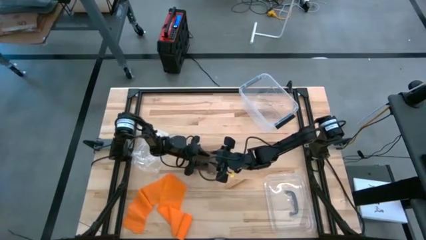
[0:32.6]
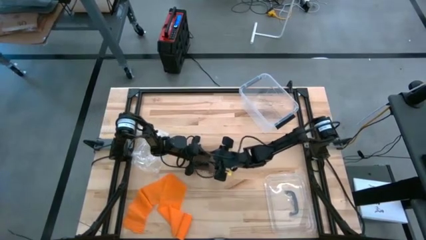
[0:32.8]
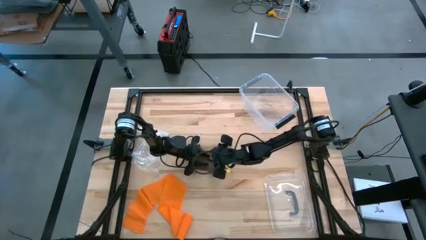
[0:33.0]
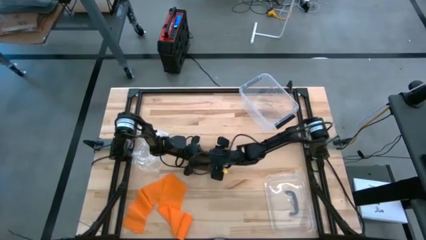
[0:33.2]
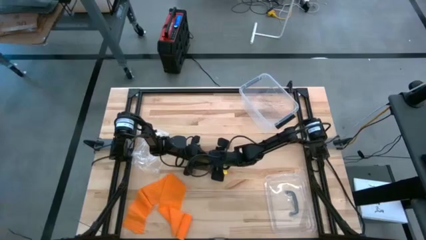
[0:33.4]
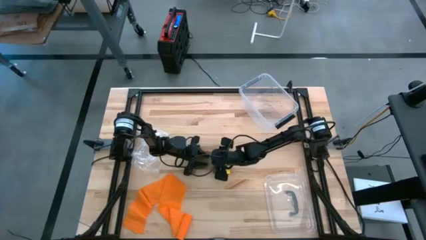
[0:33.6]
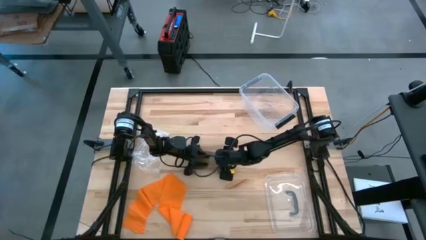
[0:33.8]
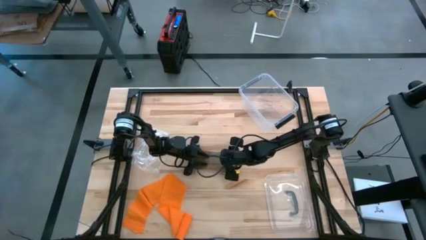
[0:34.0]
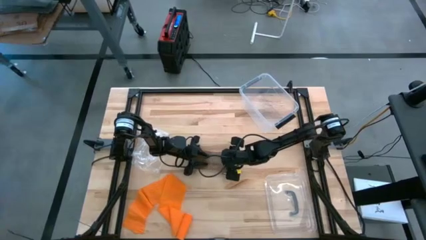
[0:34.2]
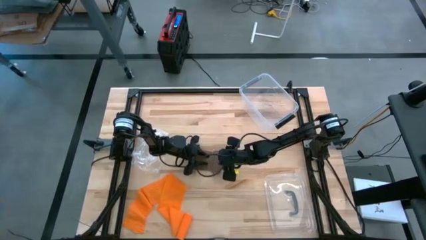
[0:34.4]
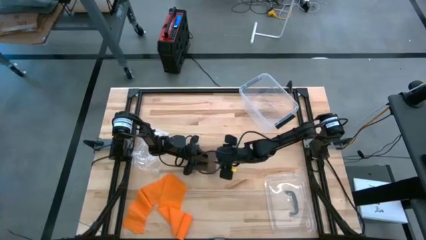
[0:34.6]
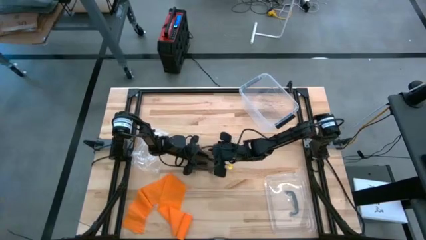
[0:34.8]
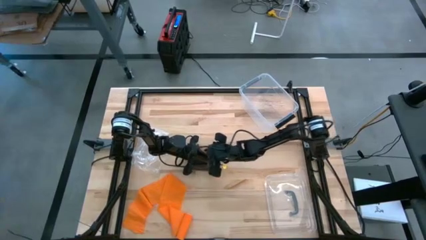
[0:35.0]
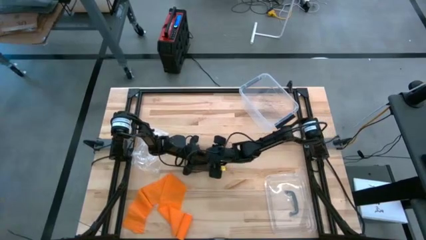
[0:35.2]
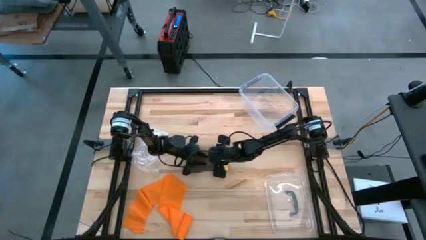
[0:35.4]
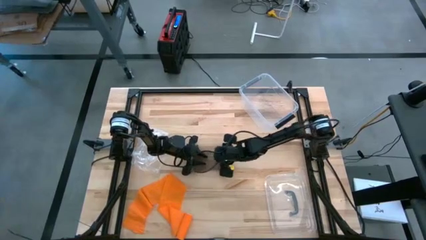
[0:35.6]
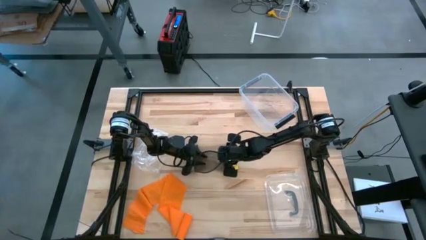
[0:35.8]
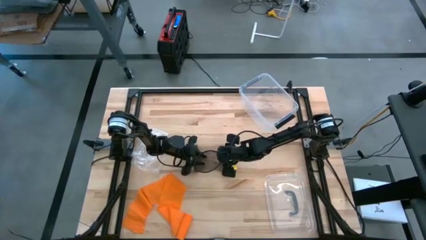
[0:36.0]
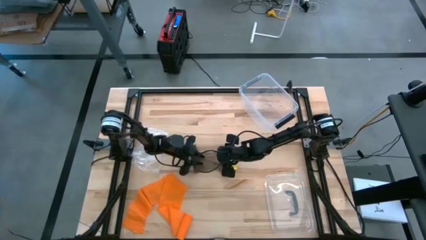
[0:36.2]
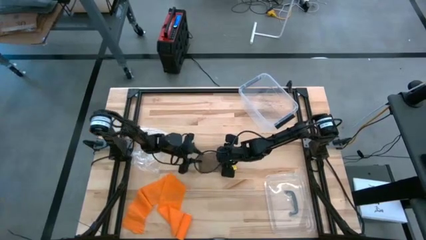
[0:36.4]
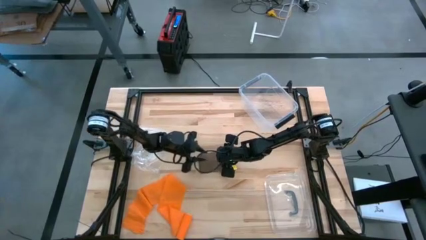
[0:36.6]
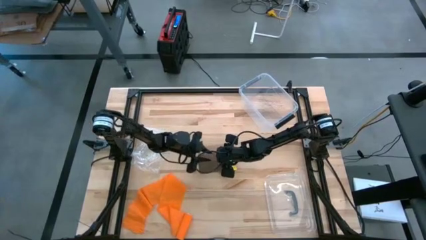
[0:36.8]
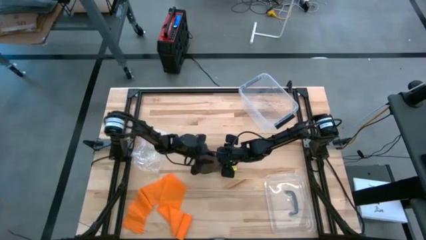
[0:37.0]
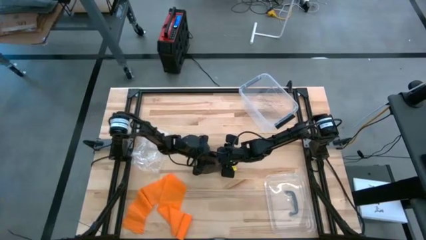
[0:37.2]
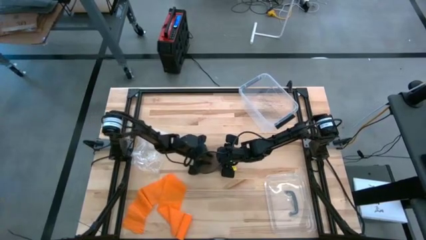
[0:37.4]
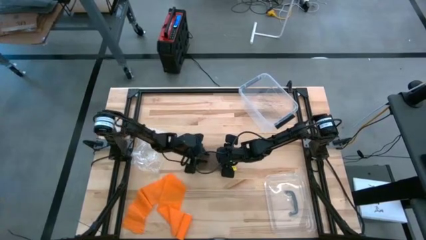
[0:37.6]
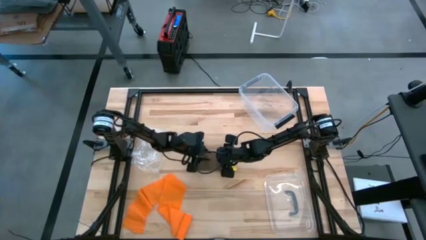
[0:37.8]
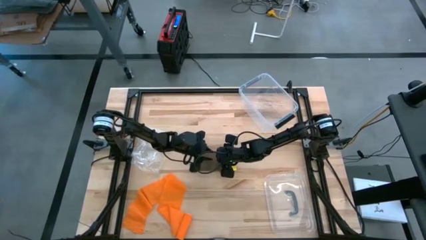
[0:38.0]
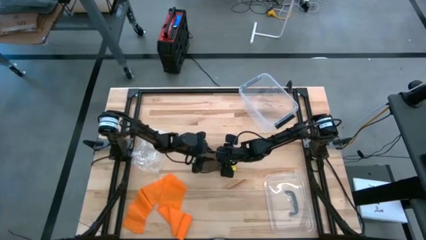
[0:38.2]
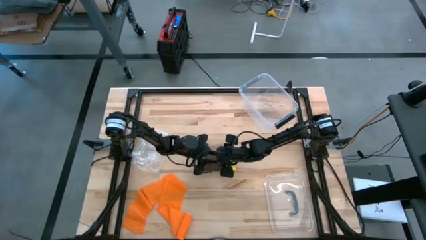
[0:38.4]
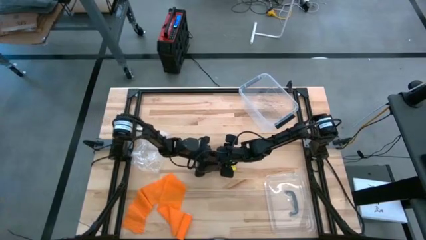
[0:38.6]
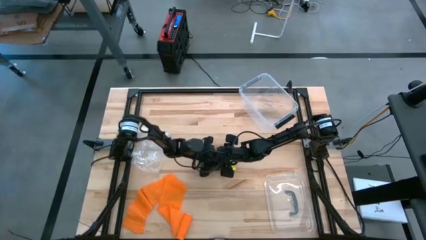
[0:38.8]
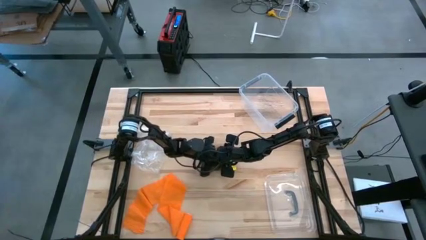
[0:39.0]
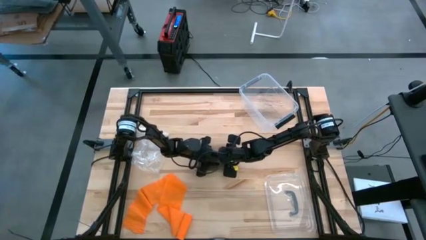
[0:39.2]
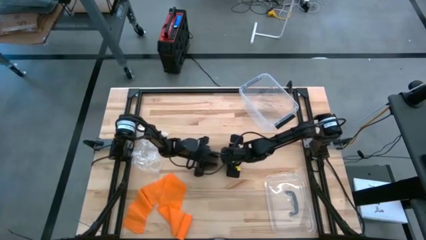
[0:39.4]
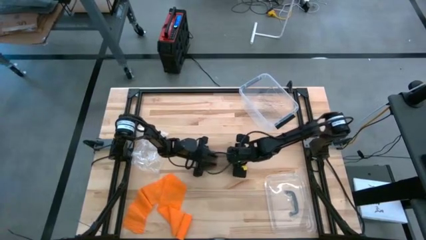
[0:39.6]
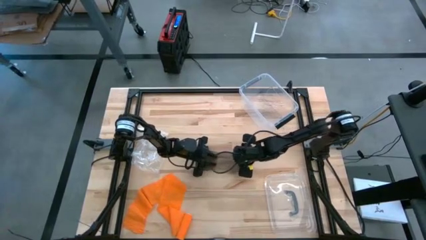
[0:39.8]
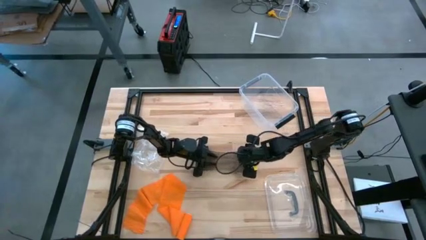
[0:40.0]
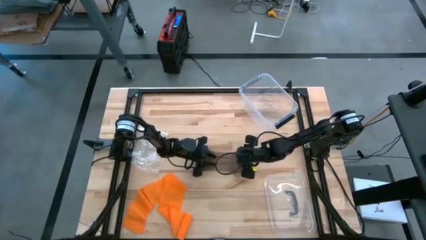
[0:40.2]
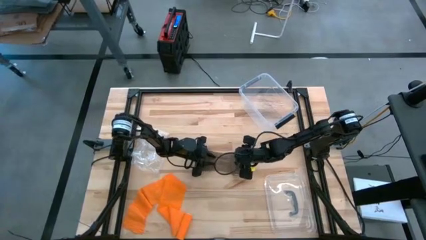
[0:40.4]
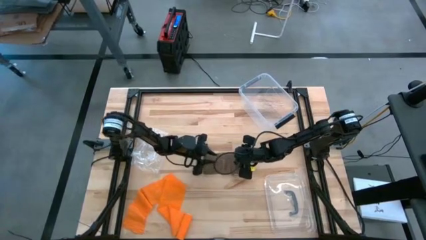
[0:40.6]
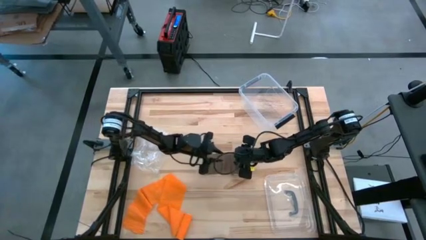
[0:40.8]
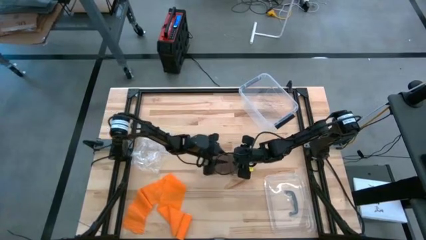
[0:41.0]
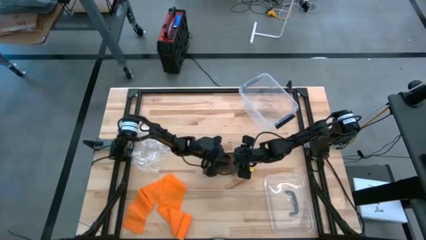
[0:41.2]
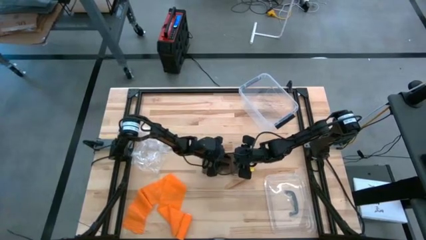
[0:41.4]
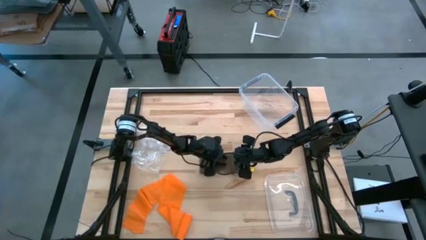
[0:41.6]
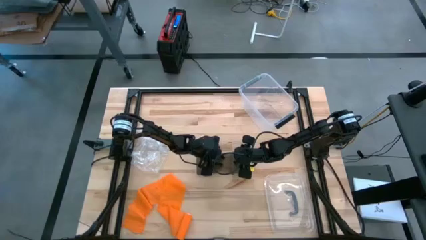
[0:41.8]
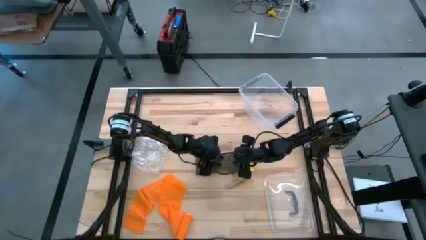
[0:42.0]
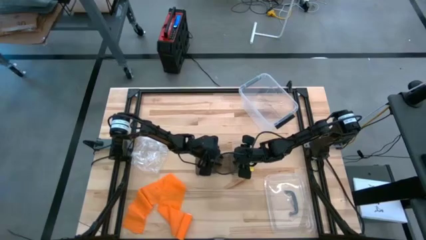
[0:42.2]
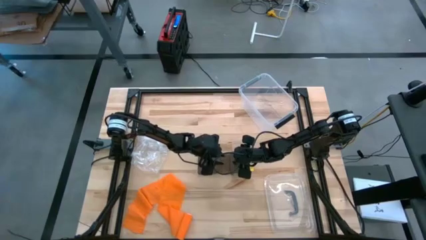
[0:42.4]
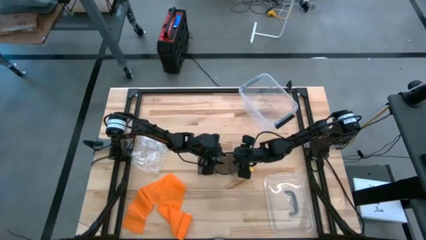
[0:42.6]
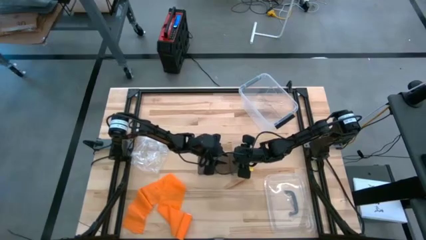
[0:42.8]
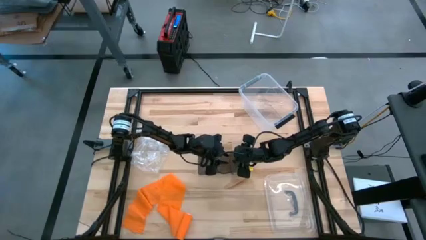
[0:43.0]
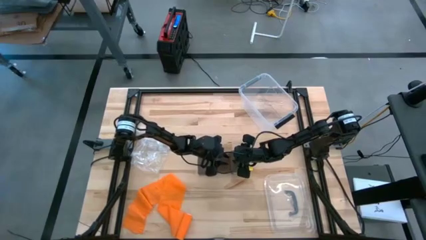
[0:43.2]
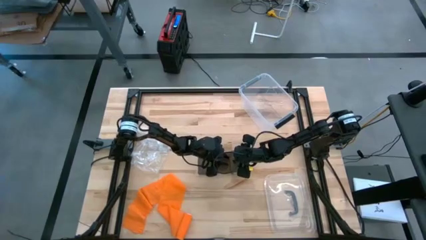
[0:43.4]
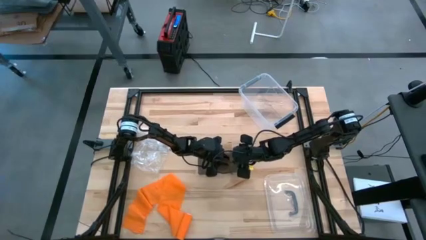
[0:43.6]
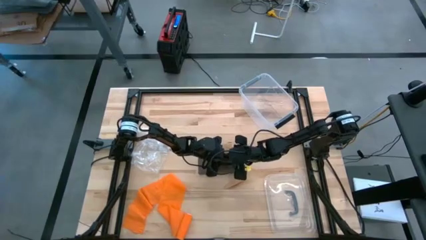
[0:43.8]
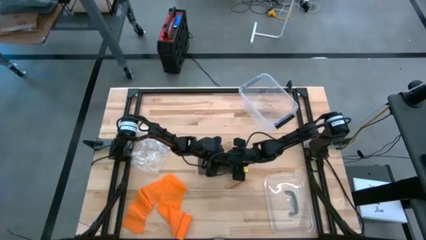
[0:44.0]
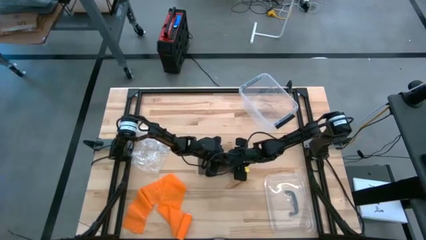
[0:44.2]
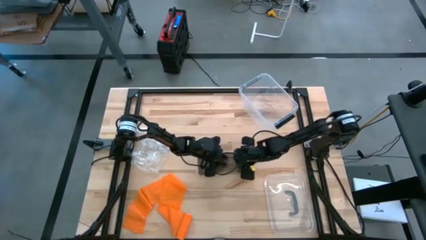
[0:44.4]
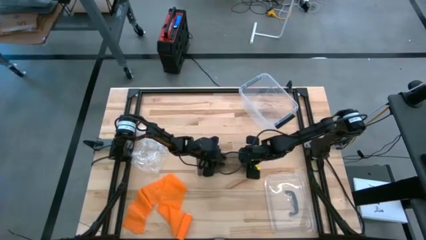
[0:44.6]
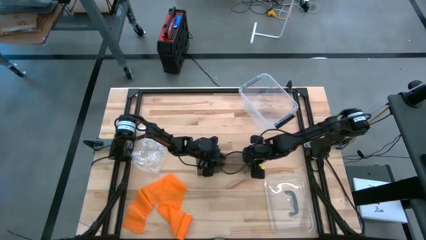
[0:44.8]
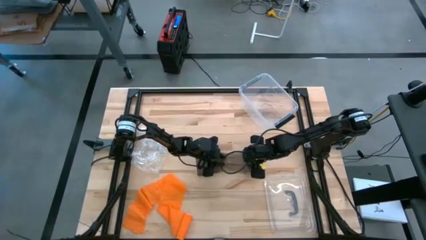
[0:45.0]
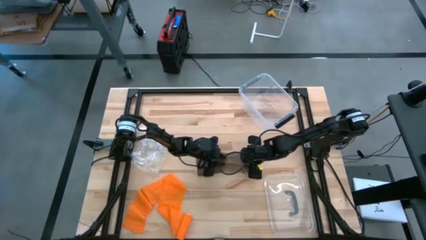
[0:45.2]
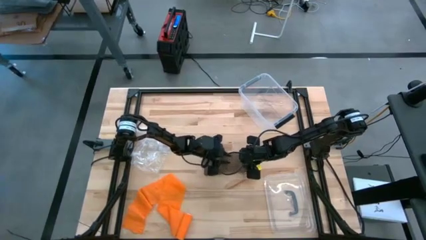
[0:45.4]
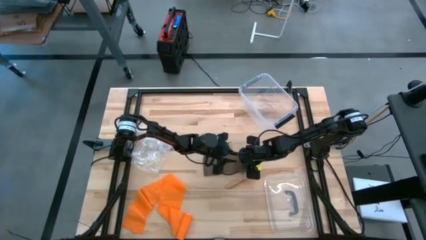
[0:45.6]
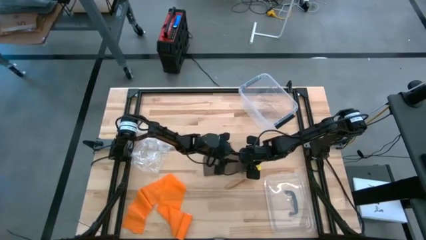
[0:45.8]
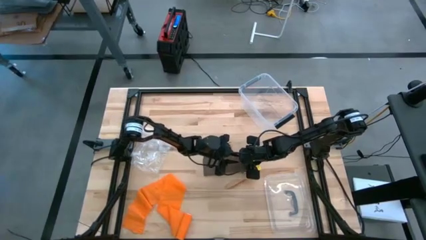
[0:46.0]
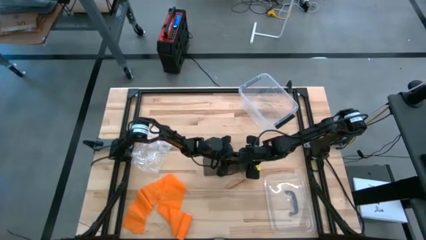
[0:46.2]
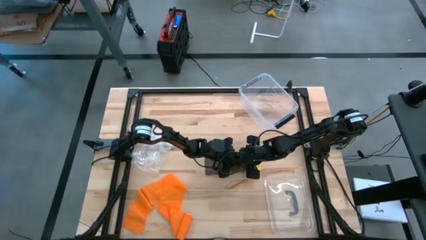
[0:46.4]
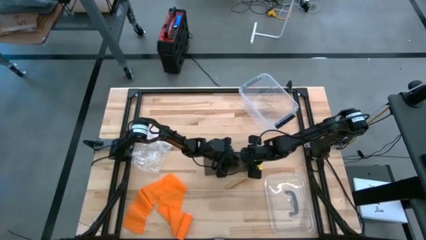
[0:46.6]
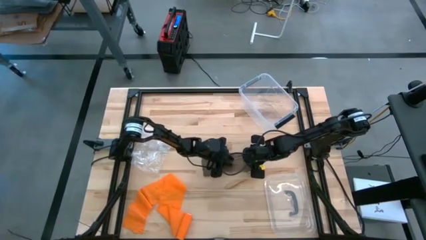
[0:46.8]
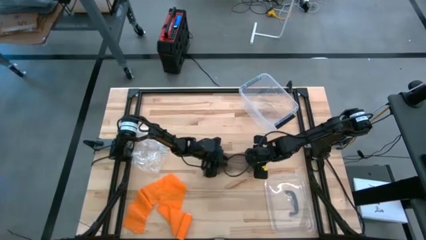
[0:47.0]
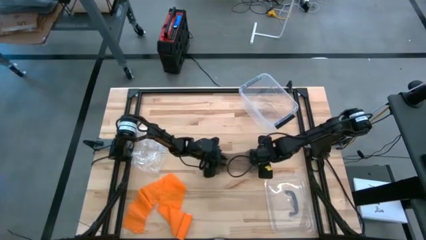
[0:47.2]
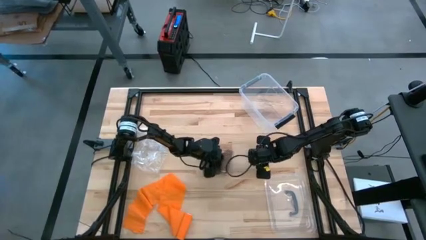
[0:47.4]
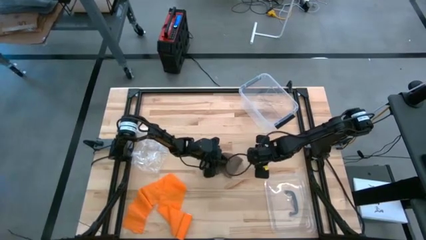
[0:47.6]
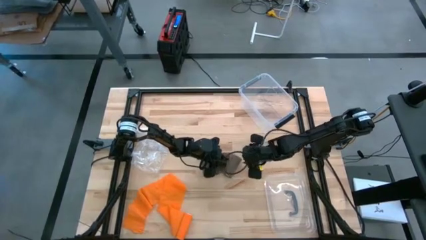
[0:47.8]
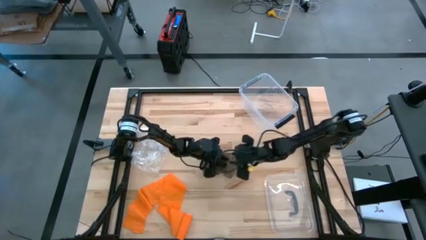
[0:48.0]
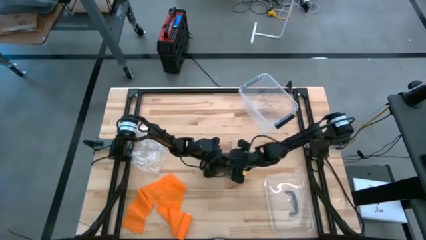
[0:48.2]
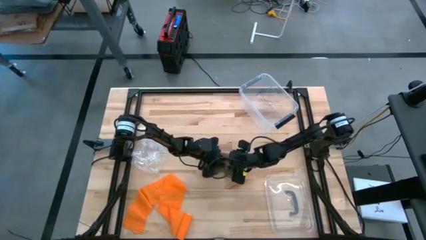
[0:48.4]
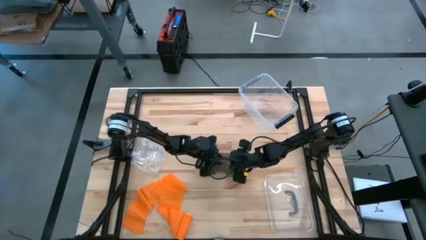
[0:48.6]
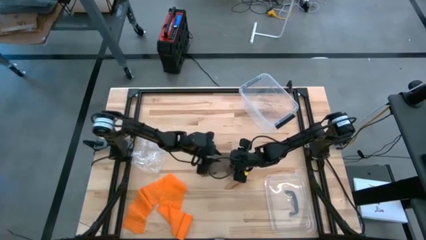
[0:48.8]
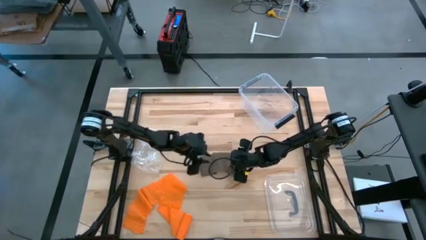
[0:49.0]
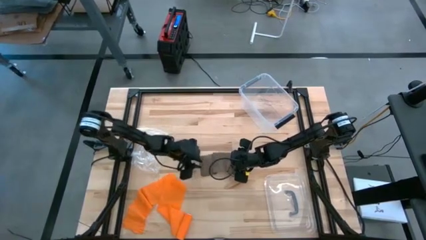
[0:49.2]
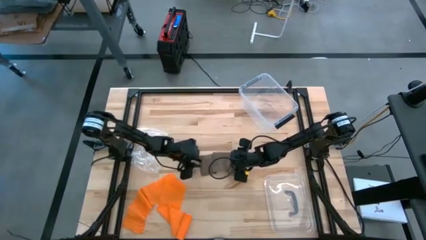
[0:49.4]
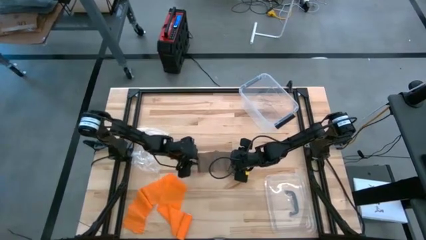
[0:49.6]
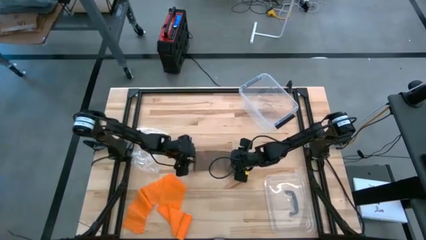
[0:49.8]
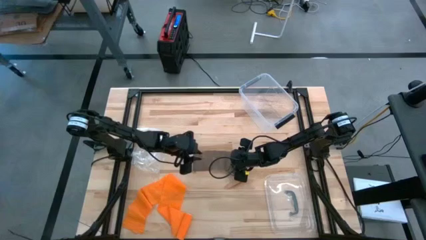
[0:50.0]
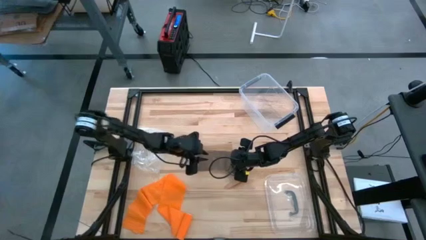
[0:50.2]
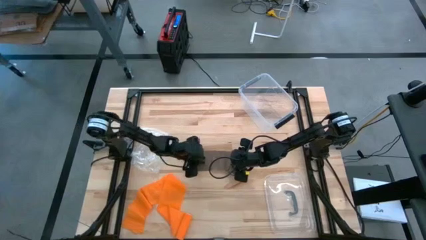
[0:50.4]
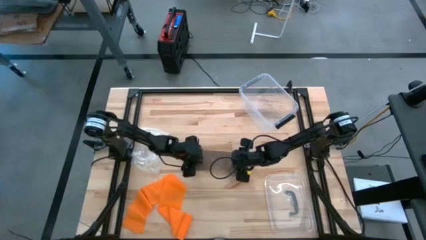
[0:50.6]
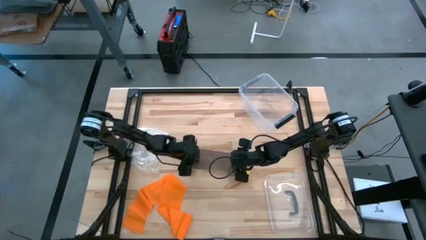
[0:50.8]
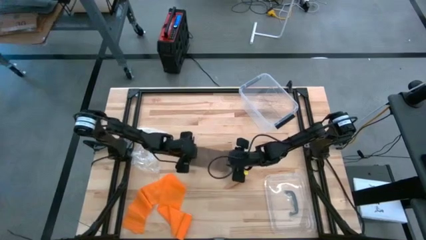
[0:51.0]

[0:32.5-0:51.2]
Task: Roll bandage
Uncoil the brown bandage
